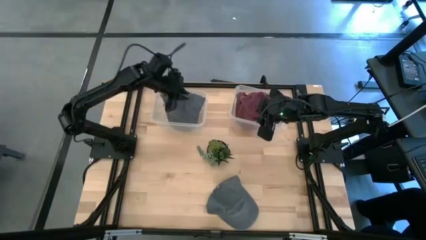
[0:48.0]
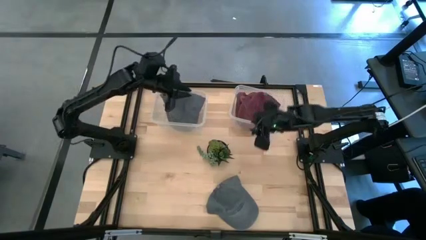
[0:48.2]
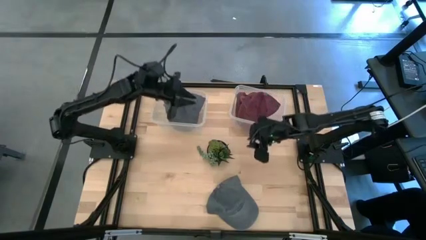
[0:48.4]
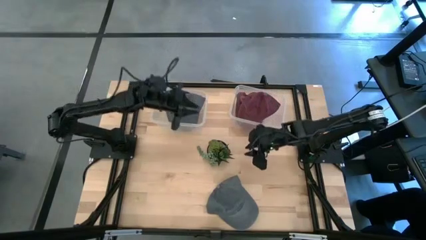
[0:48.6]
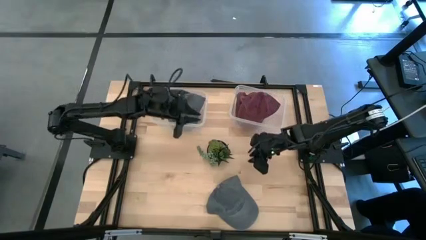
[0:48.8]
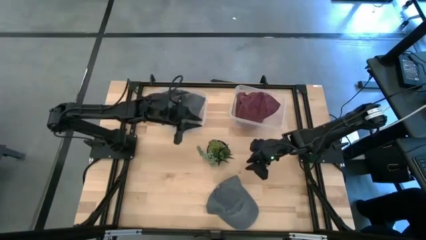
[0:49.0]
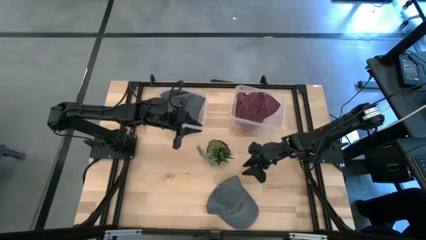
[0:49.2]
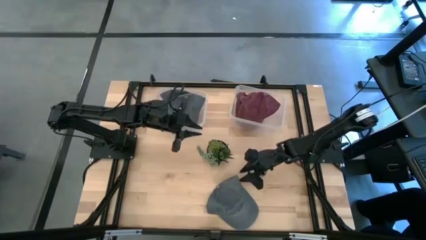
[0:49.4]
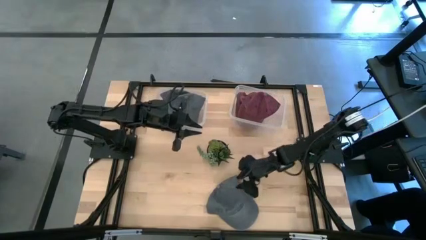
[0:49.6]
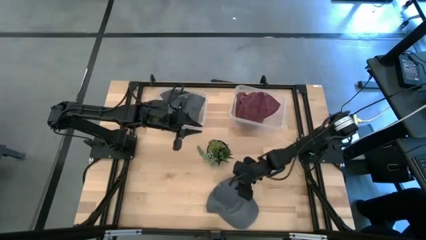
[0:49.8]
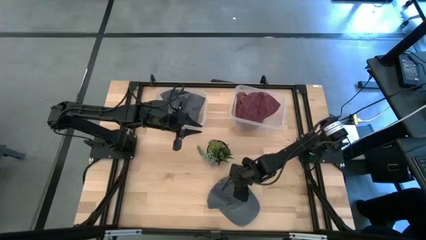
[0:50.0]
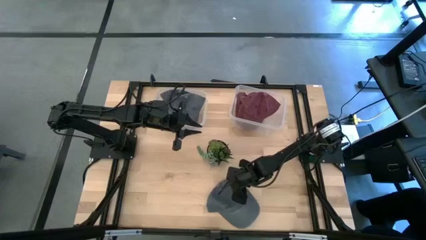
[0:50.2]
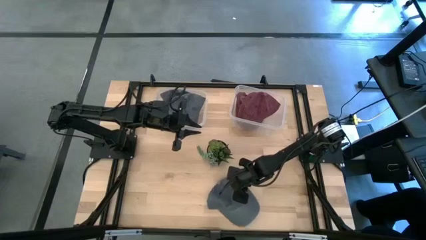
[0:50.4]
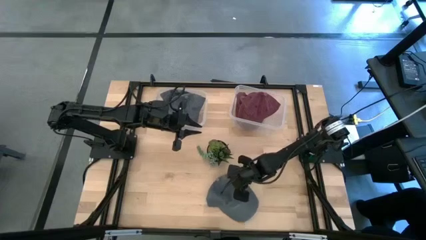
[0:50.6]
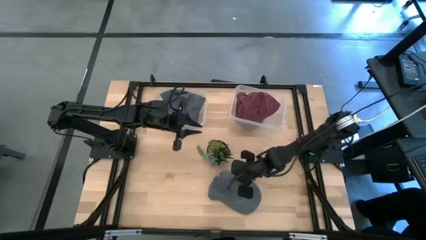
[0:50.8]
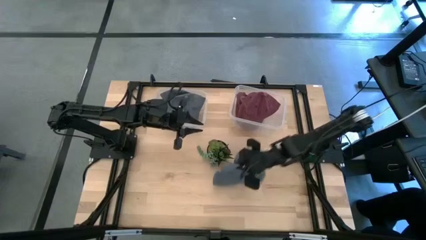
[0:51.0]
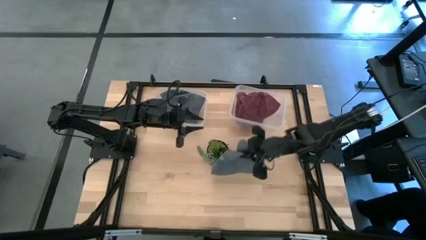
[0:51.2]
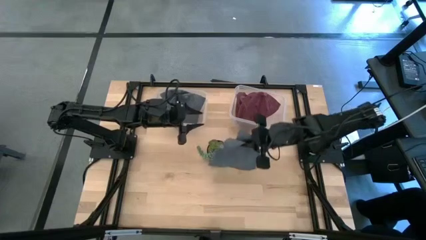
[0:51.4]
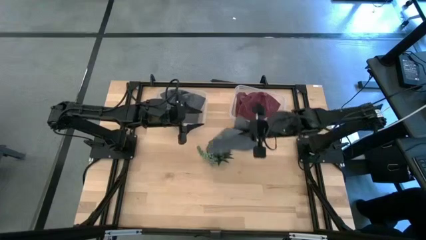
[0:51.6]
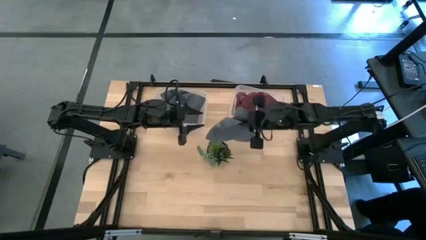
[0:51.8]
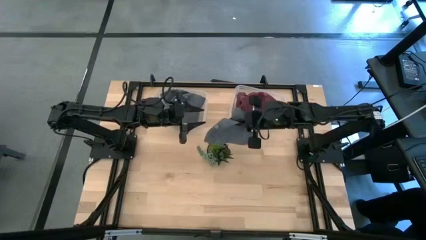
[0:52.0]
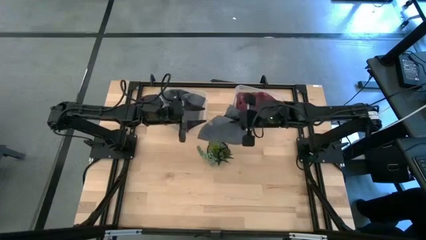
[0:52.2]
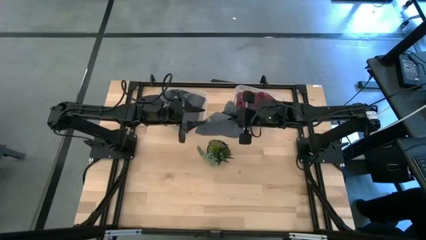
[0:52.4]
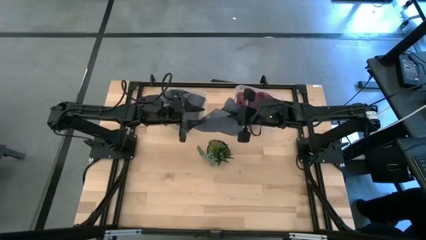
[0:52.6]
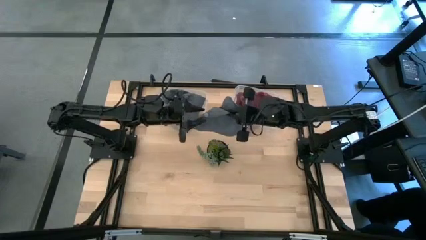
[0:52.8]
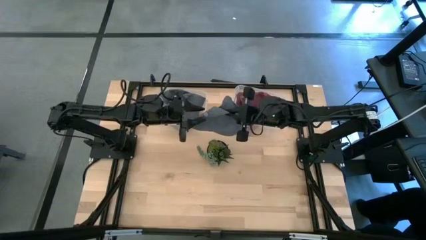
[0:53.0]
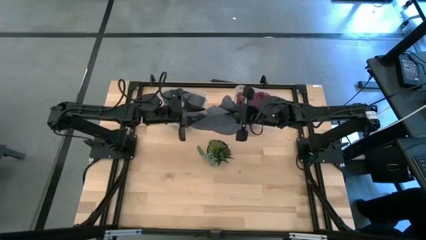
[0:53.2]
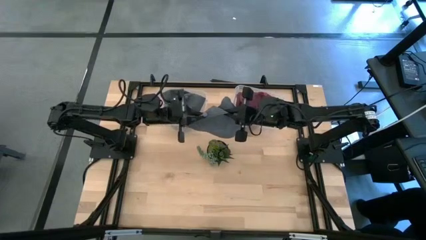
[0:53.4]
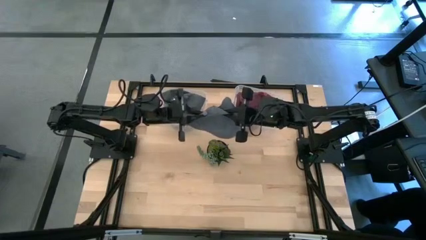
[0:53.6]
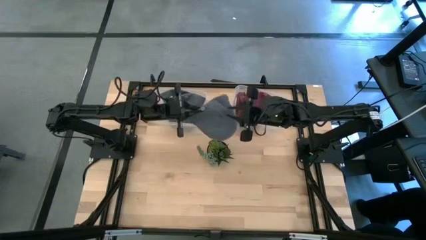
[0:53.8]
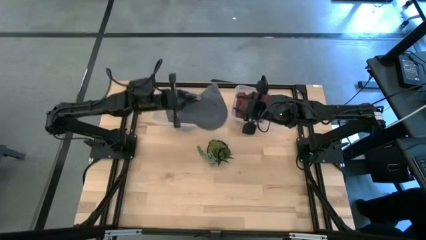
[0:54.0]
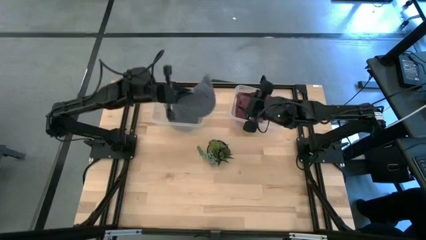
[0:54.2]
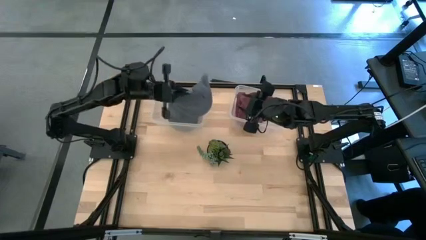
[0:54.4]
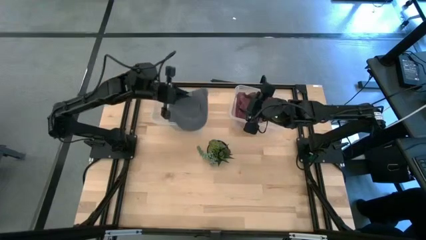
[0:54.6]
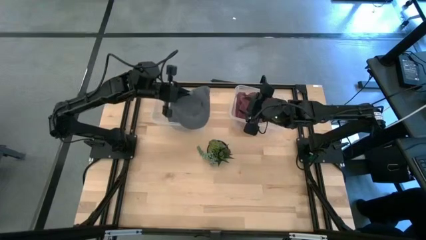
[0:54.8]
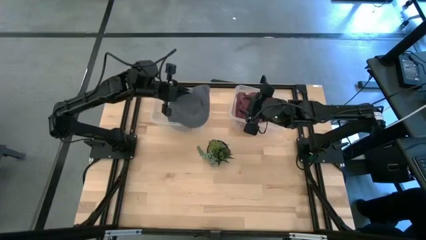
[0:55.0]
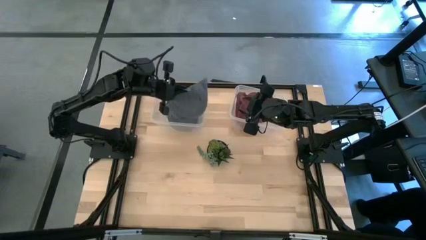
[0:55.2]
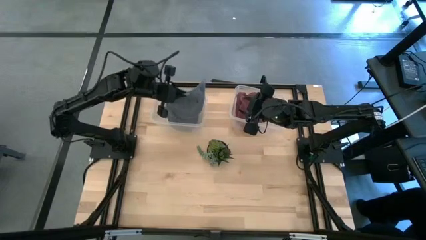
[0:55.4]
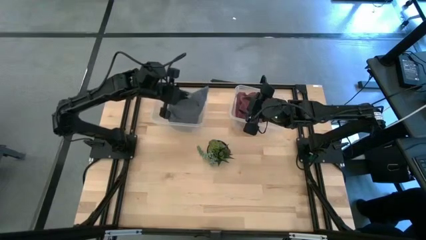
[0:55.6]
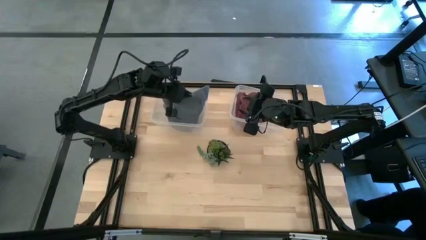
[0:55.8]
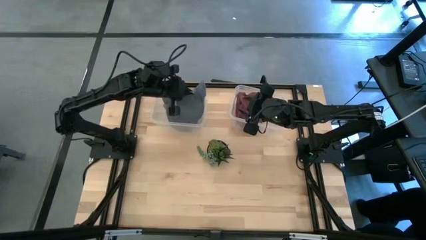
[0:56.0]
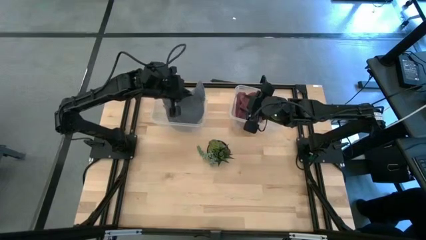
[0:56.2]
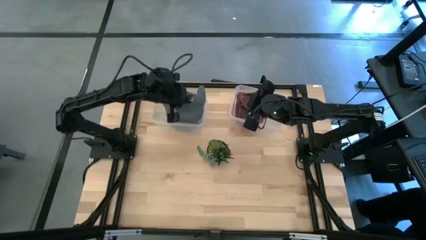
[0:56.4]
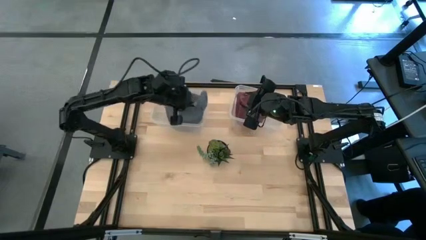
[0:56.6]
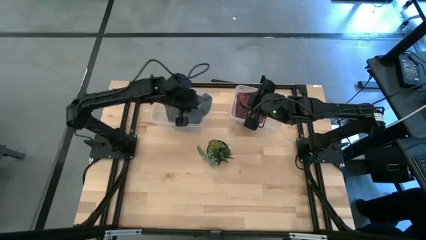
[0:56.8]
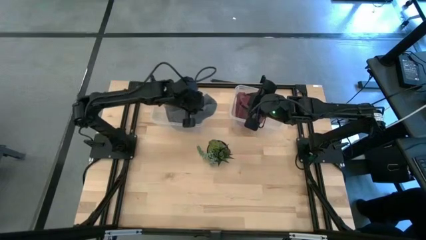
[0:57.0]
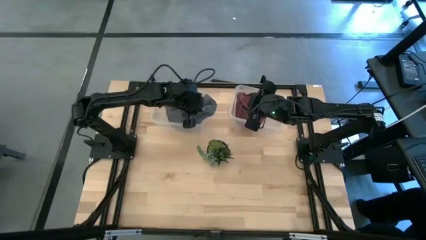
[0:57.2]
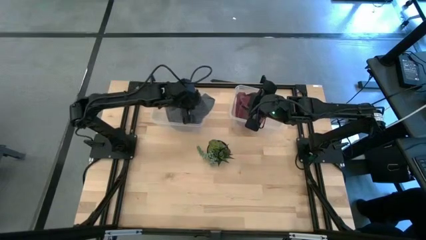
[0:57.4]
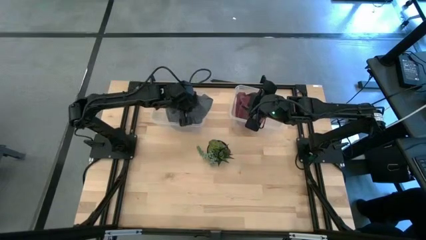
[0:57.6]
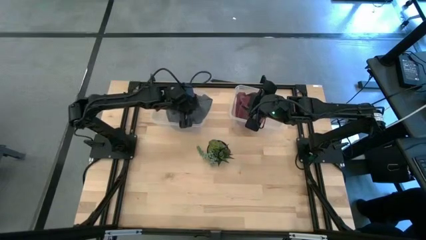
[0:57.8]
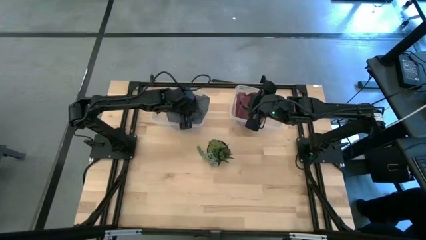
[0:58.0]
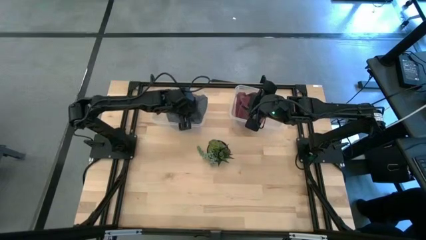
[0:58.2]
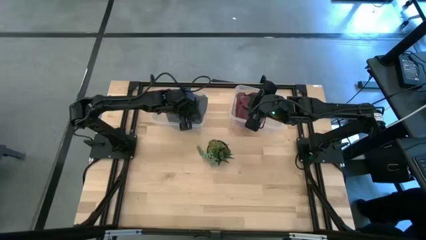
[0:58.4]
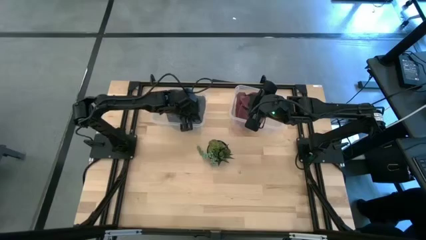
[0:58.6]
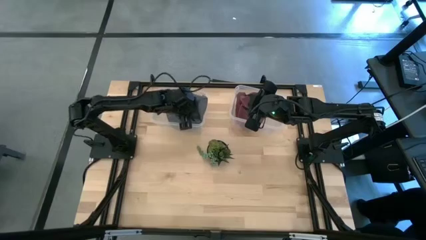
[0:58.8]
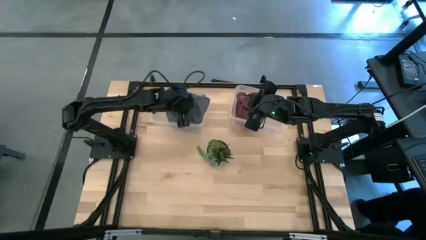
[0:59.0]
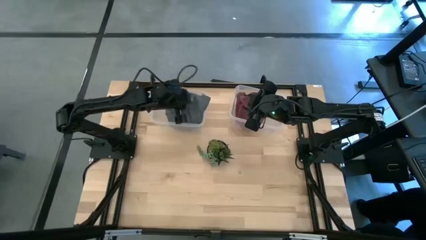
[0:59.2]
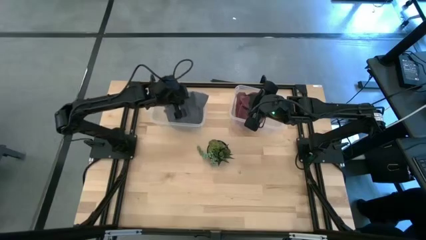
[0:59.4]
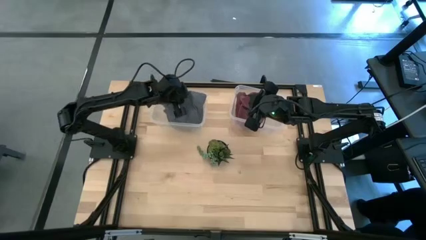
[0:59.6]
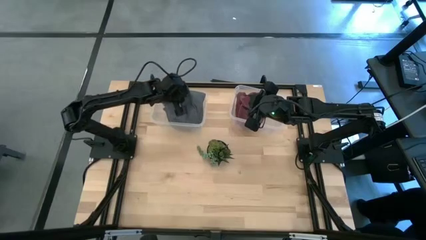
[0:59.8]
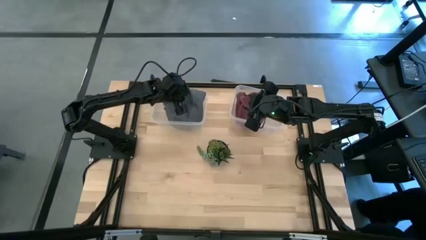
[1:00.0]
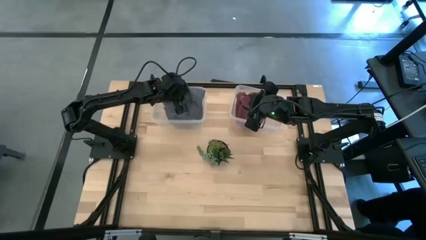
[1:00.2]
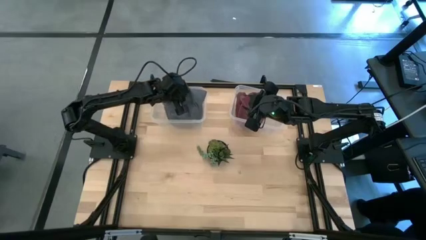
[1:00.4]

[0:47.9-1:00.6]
Task: Pick & Place hat
Put the gray cap into the left transparent bin

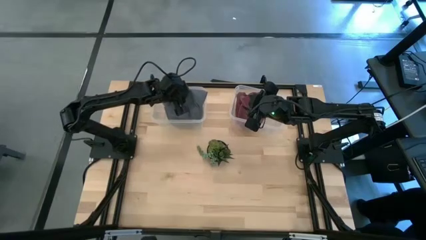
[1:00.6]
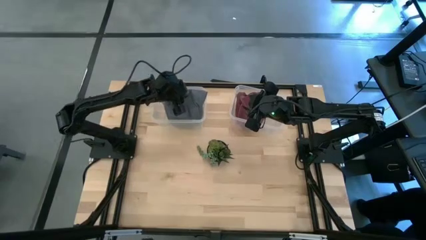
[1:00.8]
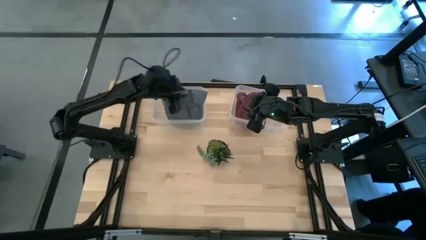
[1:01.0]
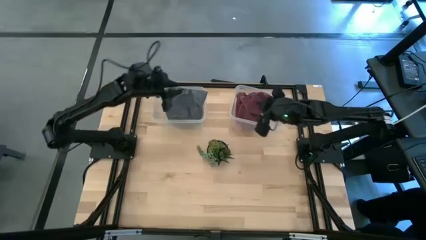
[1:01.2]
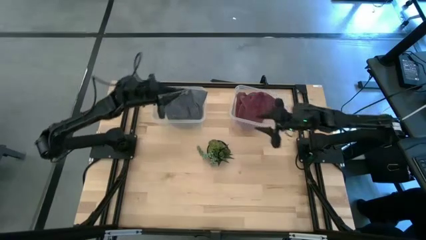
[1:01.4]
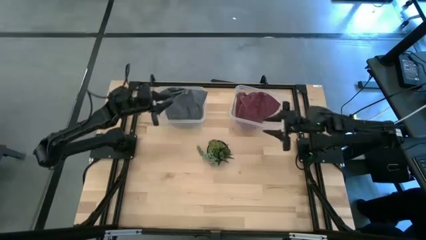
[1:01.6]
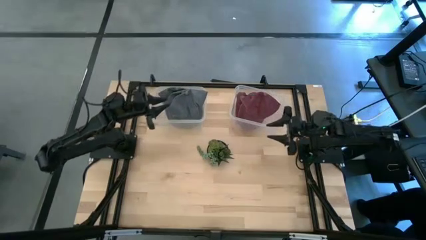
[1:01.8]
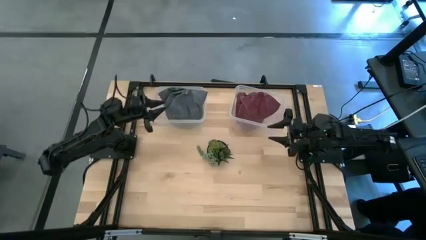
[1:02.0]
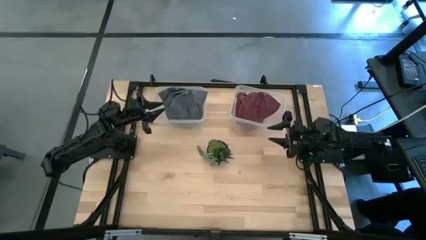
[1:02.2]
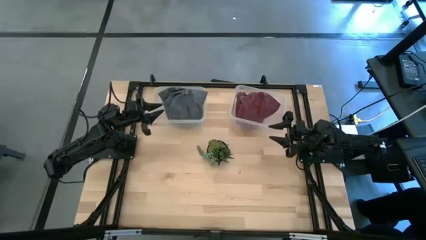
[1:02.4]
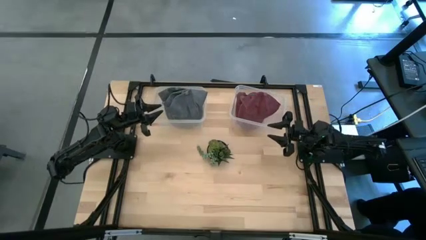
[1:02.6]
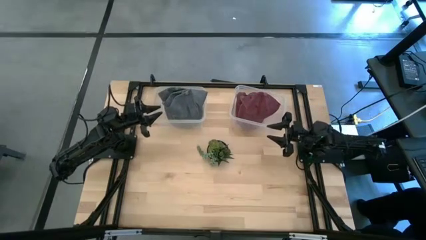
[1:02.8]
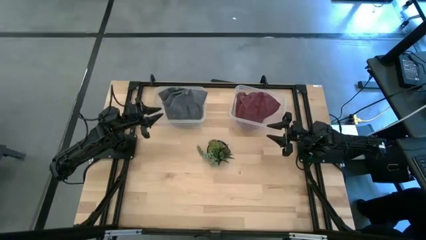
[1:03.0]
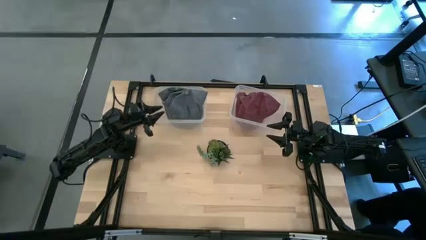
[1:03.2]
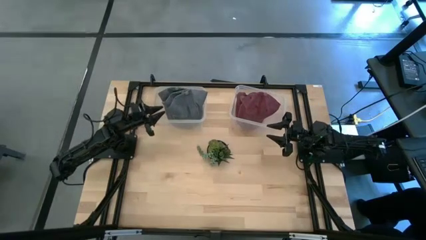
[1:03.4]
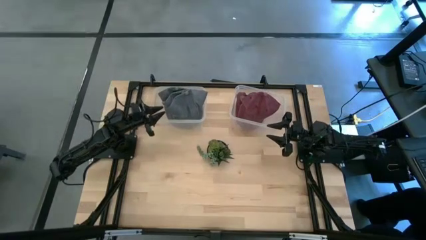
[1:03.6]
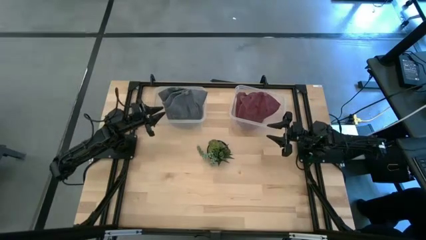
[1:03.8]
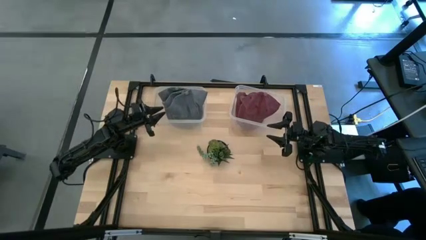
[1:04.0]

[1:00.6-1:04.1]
Return to Home Position
